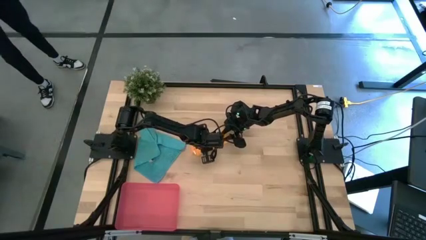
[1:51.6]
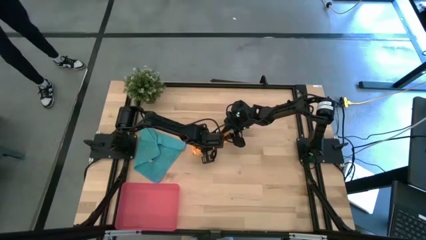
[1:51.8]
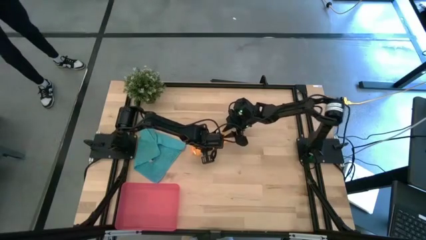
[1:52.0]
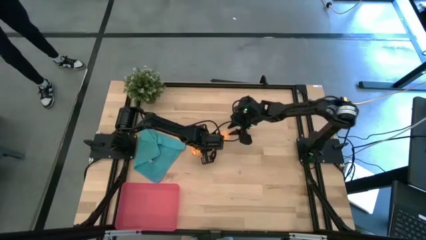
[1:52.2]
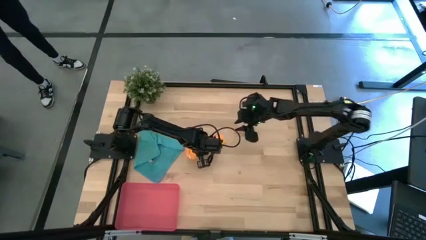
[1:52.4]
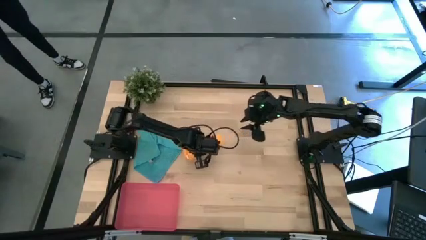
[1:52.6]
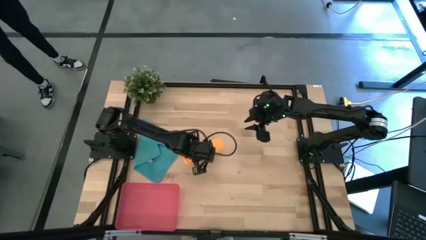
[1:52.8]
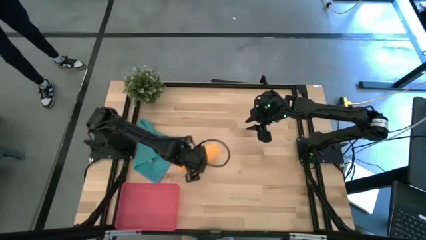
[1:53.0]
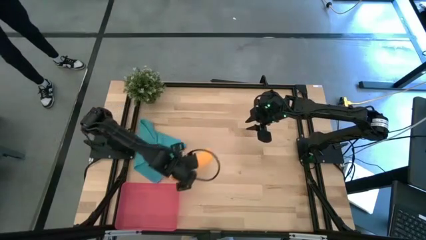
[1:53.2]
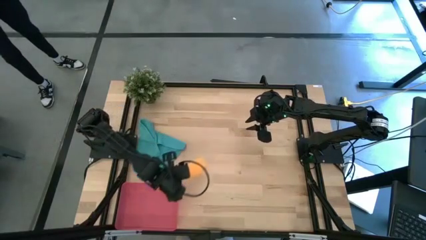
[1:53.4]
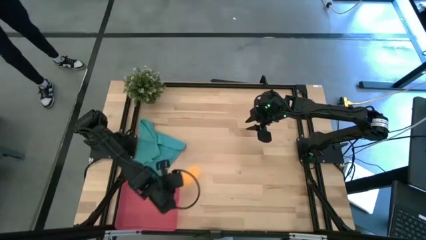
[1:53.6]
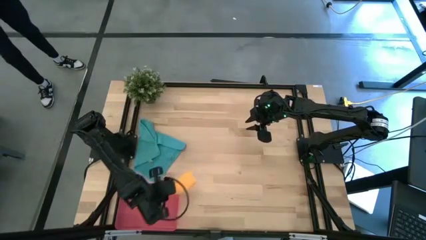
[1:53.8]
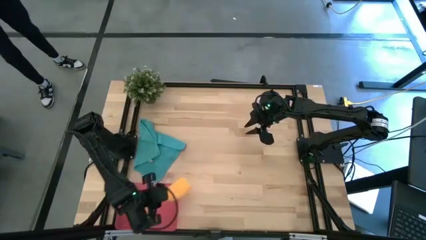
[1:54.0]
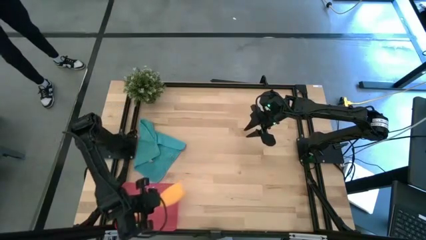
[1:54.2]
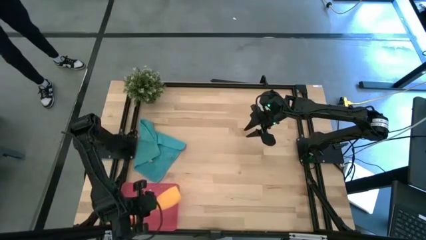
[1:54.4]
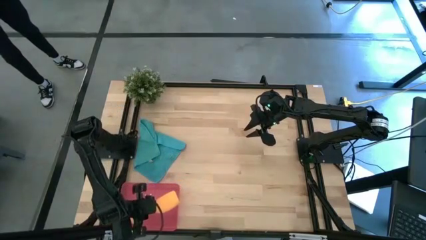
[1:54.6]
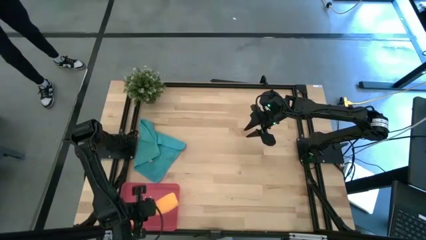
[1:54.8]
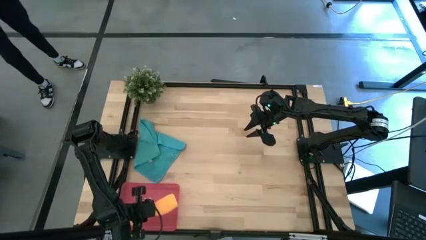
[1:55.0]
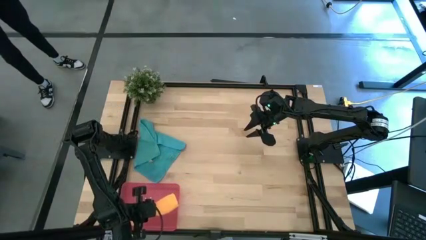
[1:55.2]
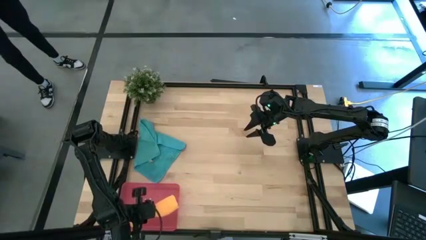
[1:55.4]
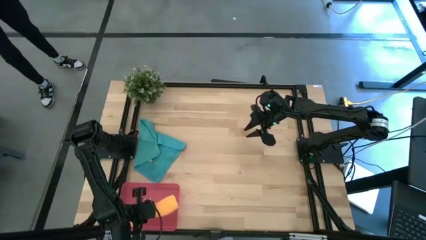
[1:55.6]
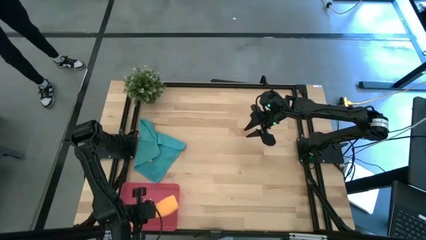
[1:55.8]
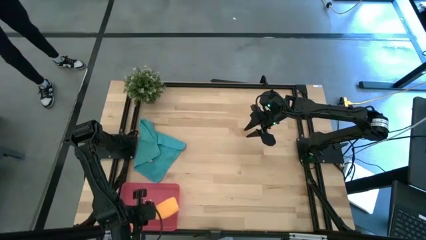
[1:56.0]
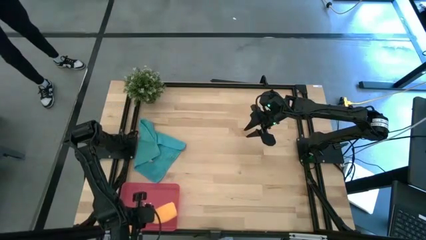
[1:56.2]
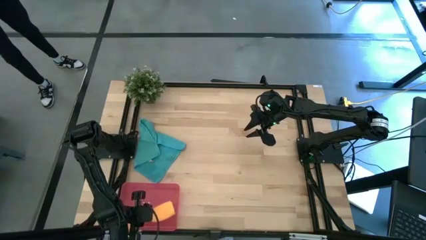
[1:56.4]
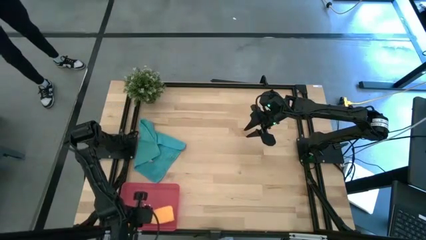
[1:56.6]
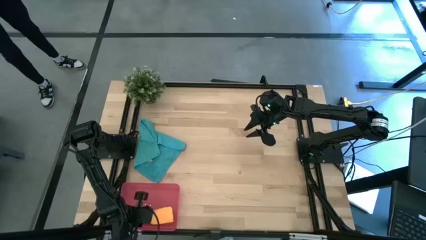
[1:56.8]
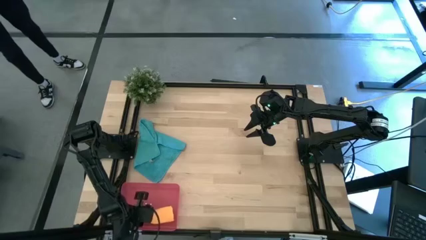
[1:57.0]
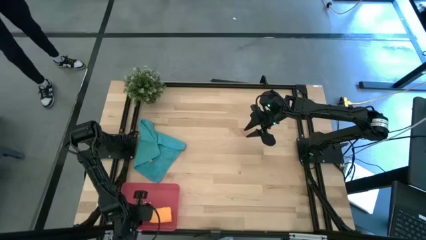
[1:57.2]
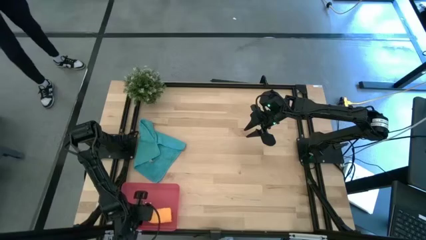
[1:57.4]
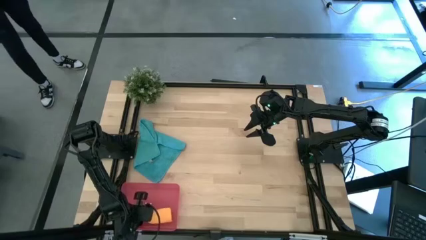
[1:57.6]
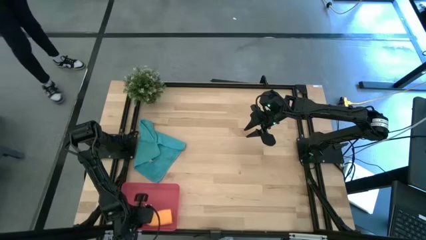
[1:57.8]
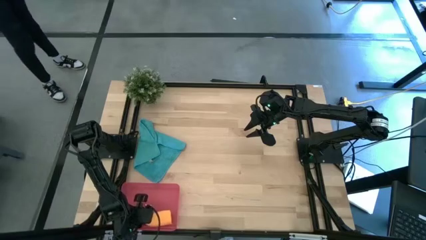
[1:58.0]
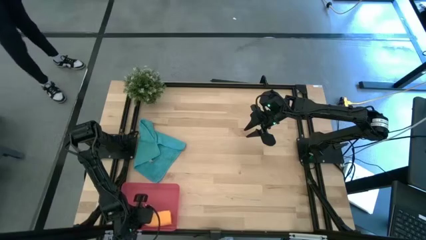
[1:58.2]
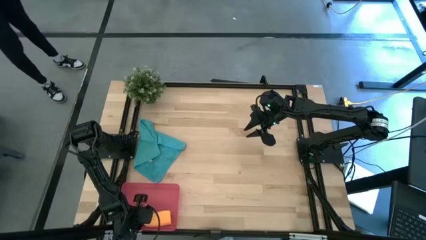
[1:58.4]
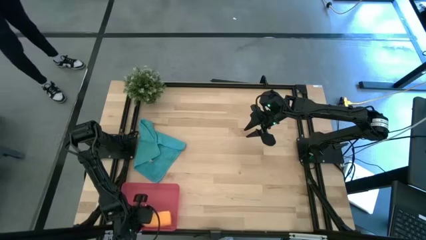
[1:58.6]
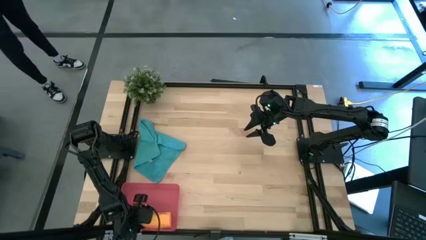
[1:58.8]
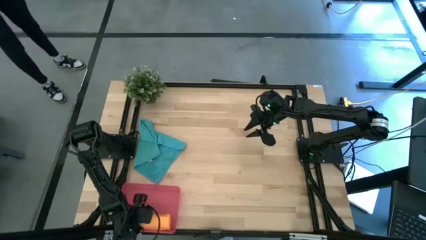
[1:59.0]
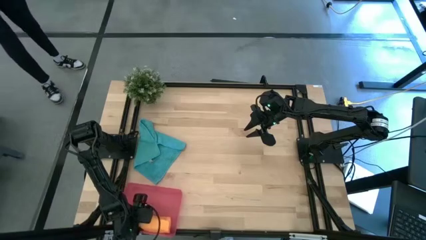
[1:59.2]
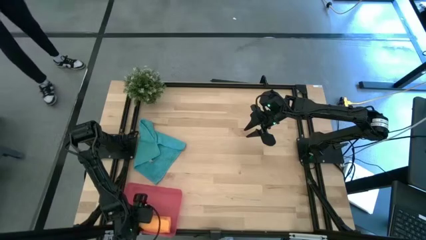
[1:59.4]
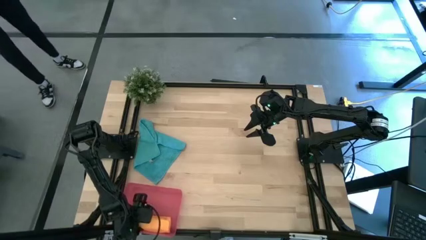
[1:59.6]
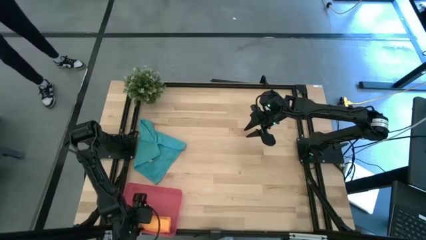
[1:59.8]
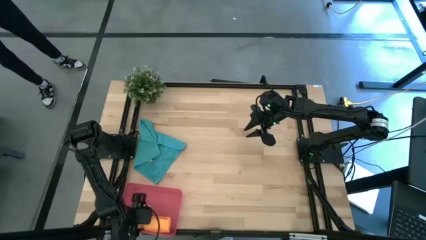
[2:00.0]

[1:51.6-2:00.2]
Task: Roll microfiber towels into tight, uniform cylinder then place into a basket
Put the yellow microfiber cloth into the bin

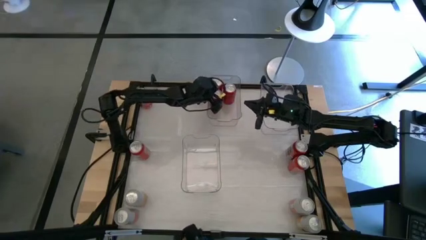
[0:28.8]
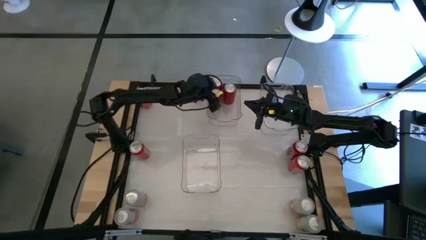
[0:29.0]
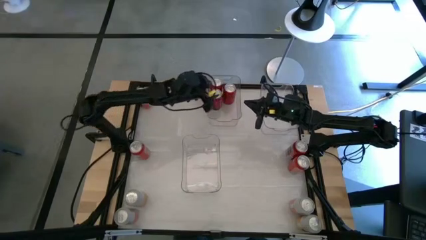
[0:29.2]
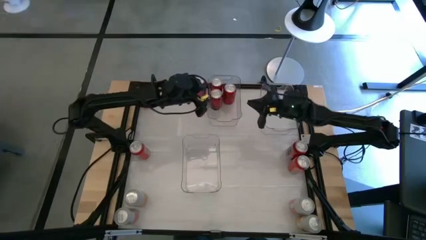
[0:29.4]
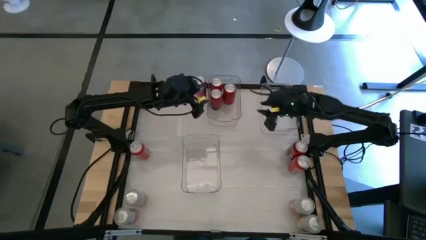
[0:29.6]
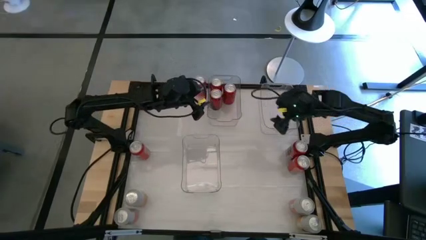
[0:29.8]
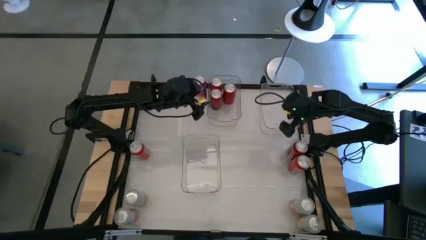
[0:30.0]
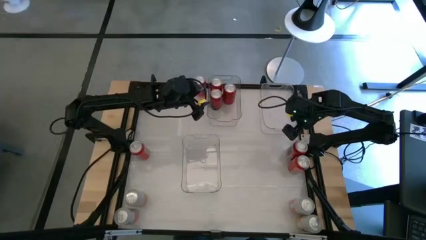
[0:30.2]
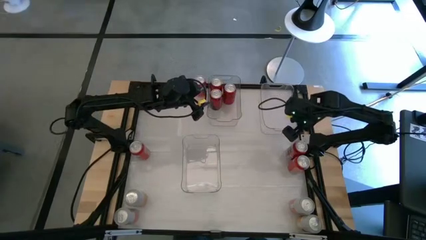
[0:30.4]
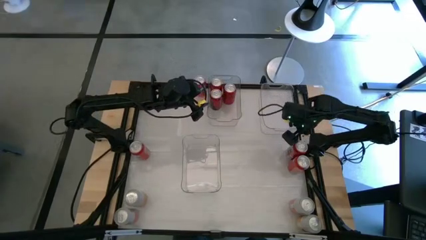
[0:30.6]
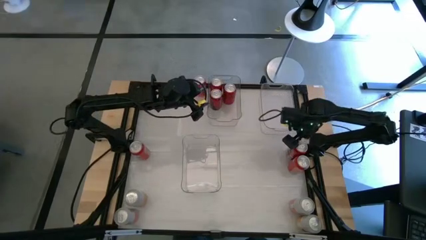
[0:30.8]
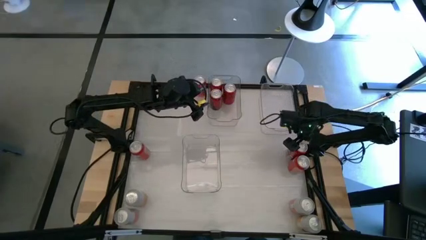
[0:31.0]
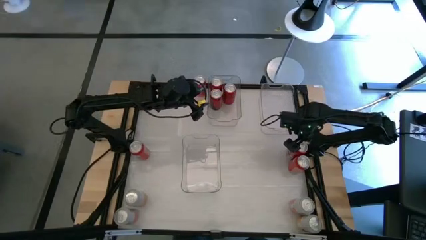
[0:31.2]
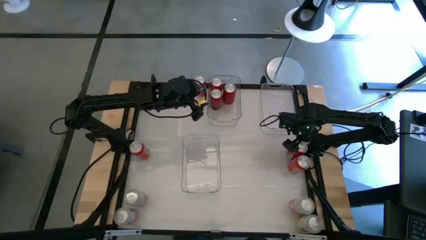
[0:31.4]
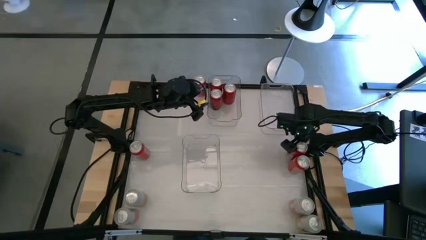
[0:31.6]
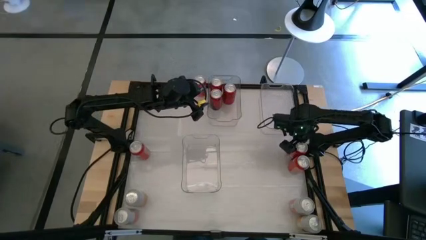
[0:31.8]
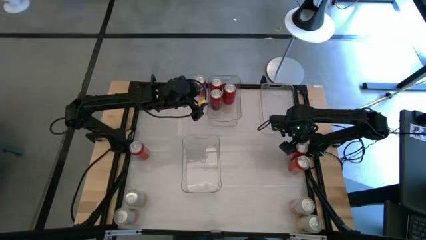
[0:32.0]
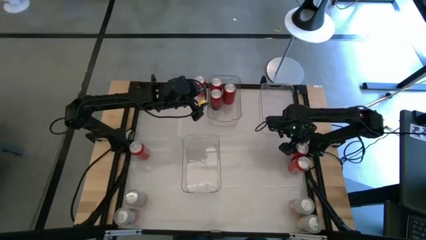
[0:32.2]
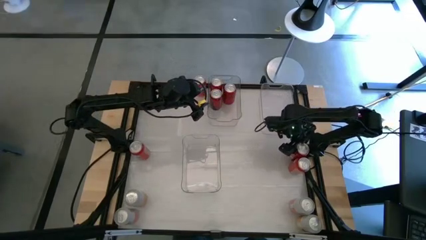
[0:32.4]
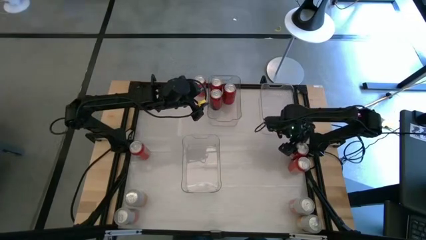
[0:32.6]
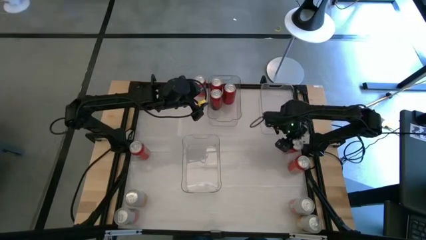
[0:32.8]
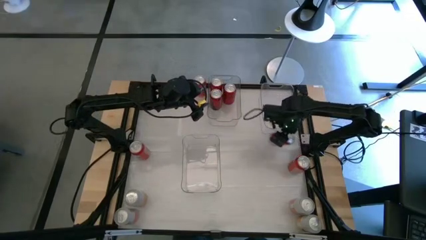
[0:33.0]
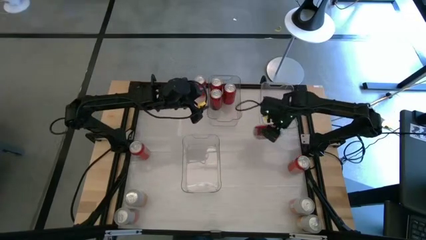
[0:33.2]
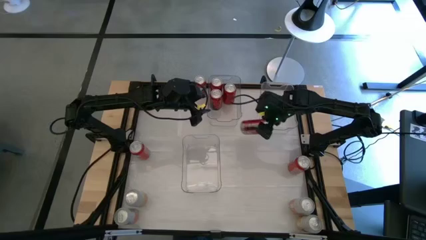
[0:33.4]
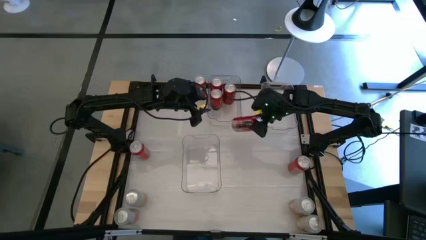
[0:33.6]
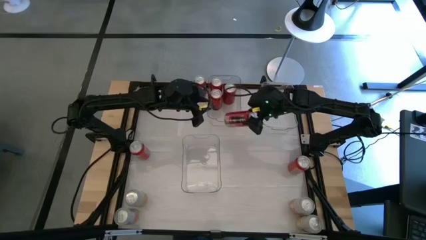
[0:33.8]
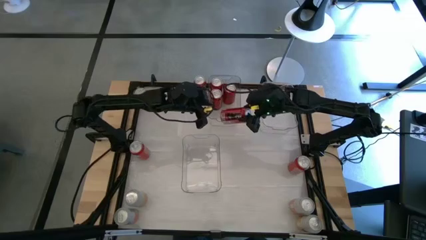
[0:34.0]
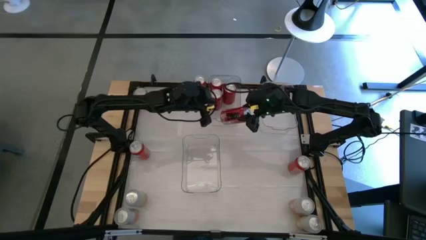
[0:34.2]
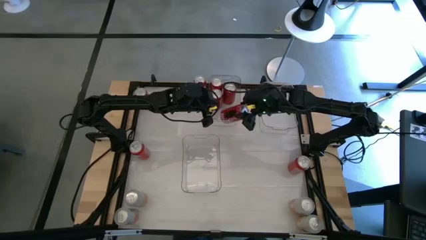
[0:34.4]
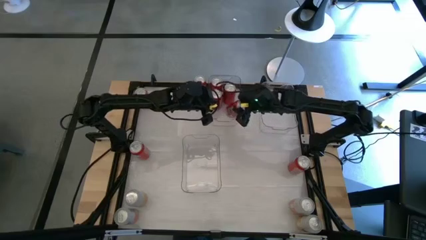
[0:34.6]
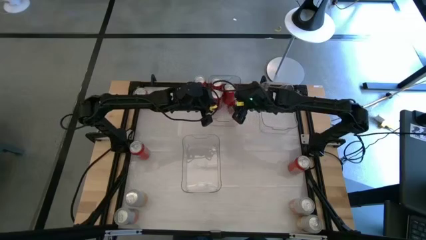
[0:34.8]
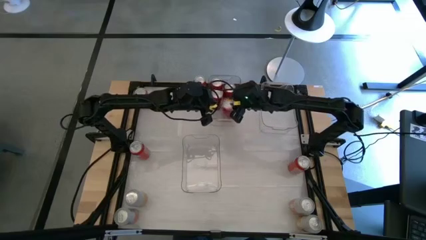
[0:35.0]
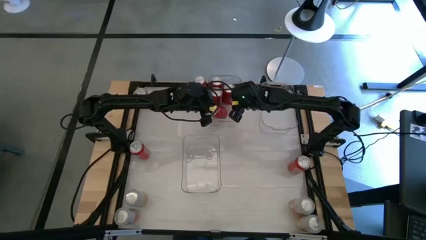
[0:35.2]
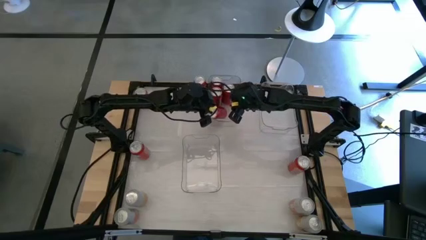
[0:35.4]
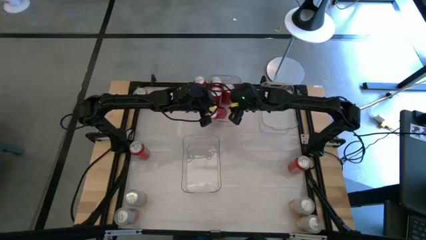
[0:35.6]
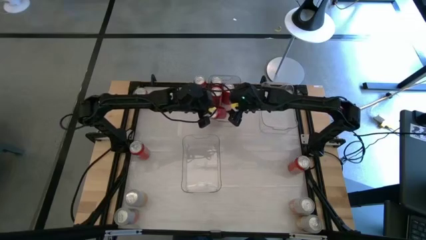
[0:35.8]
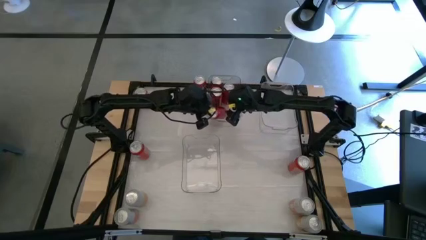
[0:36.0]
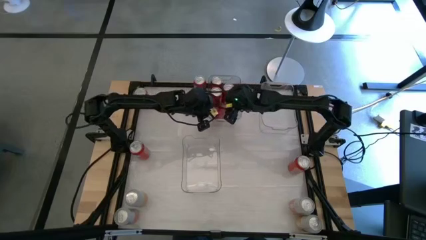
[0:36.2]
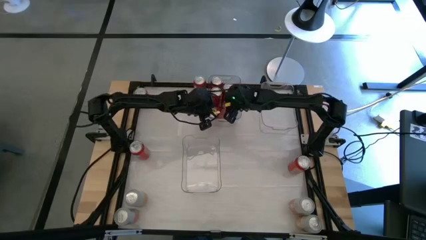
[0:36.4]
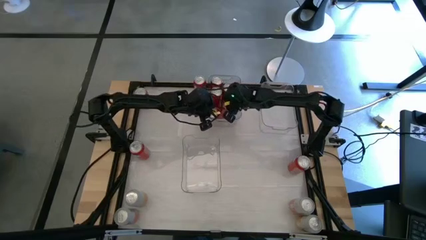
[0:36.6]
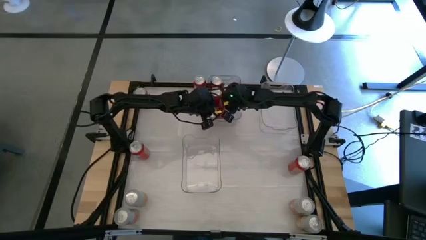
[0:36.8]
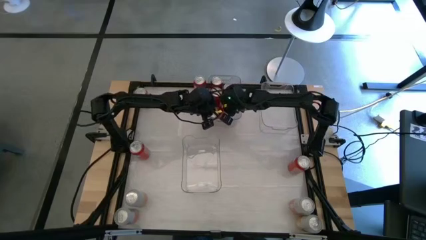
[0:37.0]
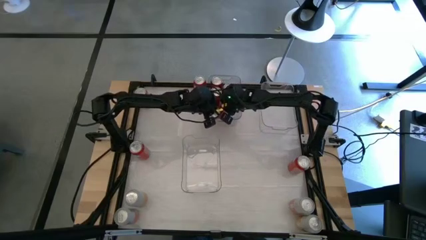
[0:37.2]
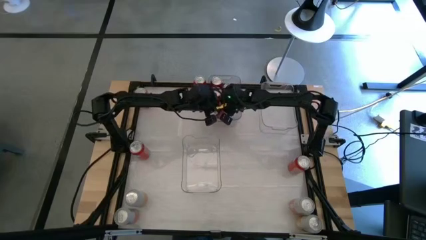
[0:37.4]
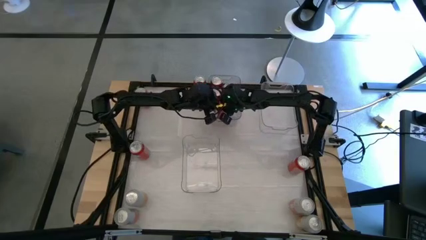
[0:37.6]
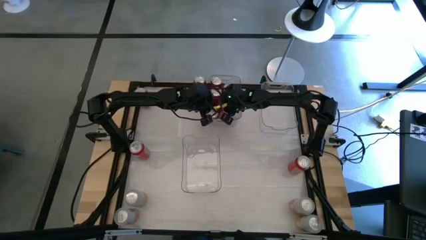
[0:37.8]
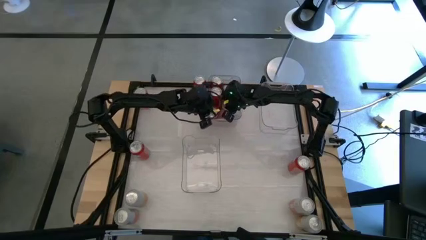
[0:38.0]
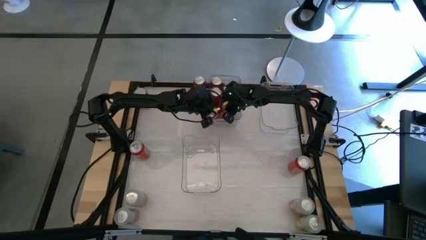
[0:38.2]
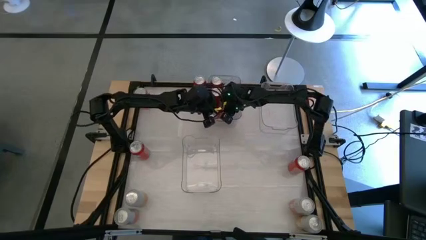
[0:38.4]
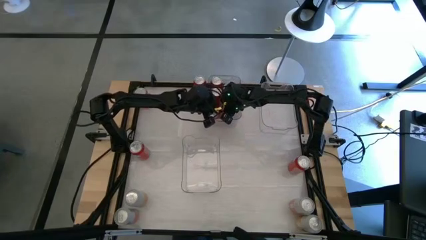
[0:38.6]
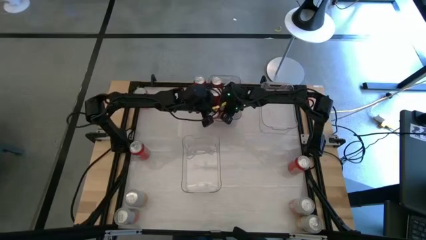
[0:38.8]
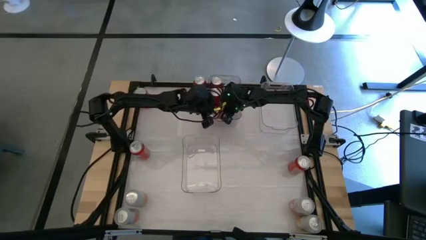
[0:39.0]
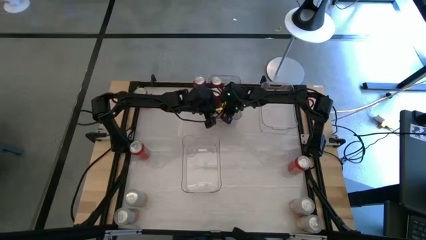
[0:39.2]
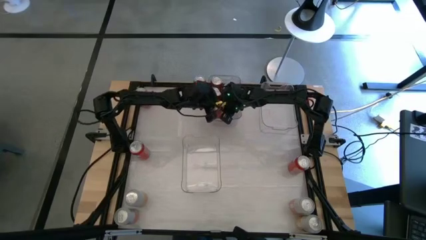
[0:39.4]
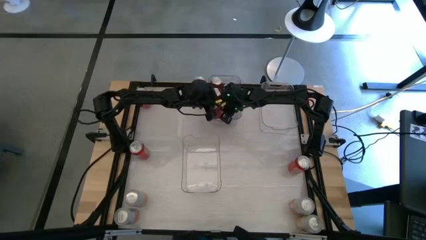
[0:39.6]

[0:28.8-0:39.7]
Task: Sort soda cans
Put the red-black soda can into the top left transparent bin
